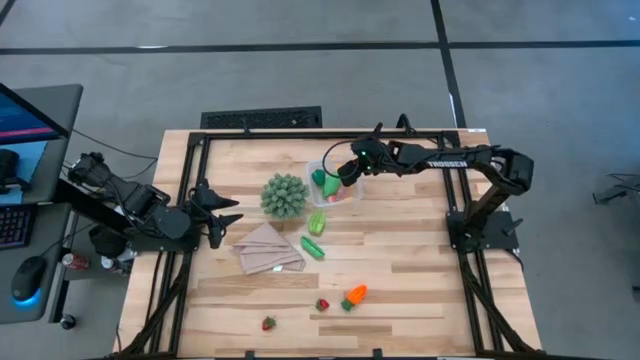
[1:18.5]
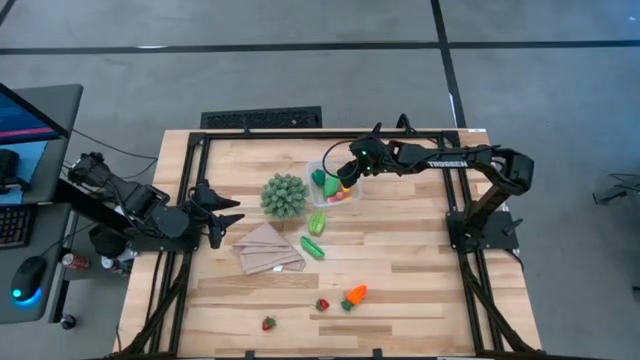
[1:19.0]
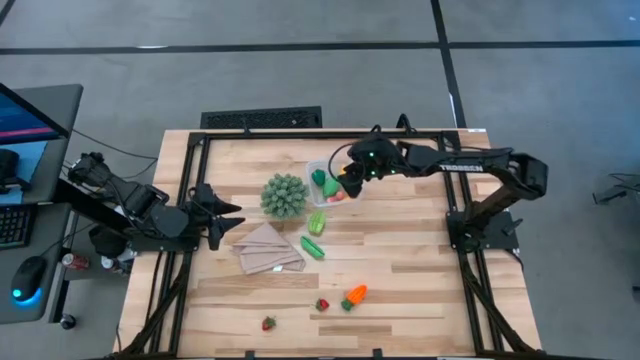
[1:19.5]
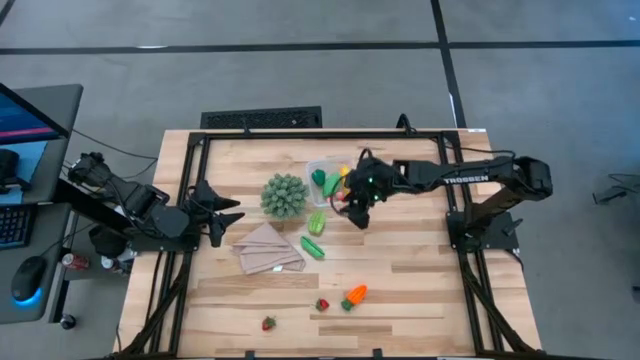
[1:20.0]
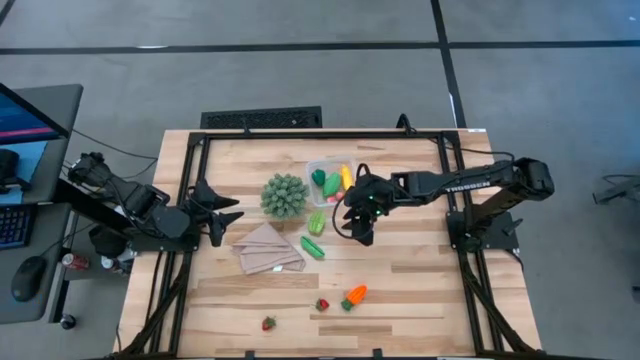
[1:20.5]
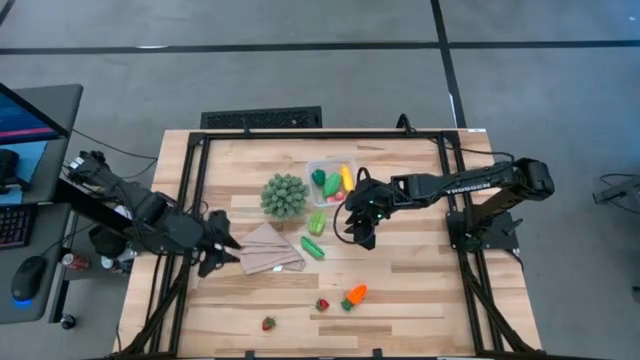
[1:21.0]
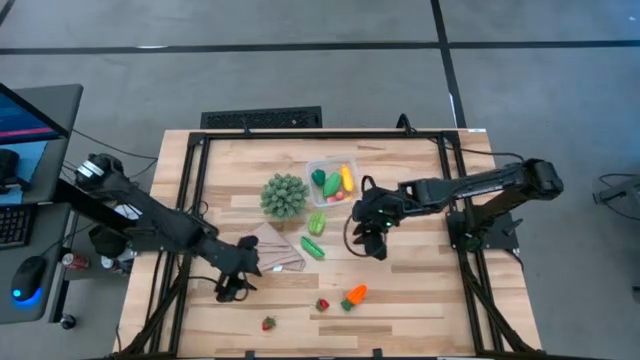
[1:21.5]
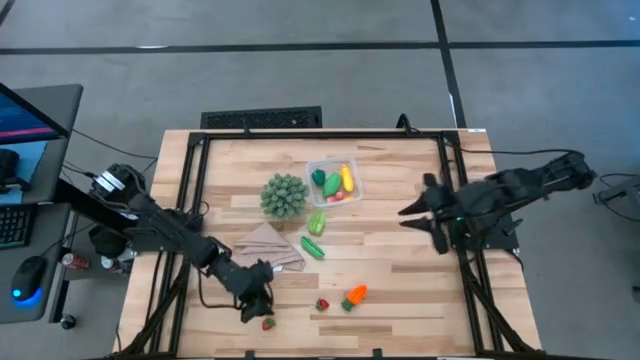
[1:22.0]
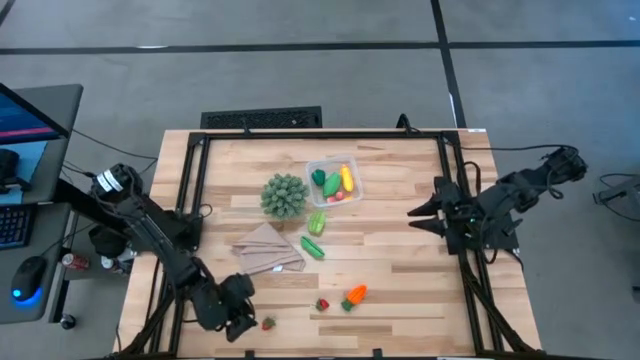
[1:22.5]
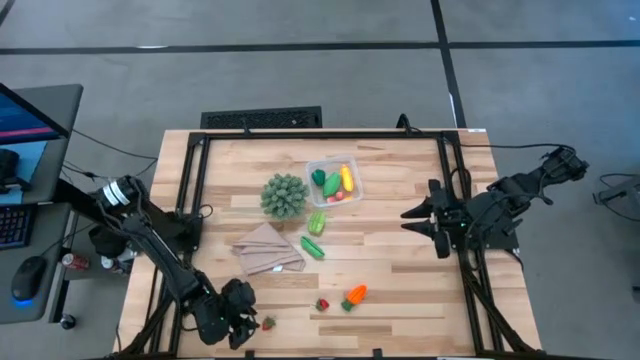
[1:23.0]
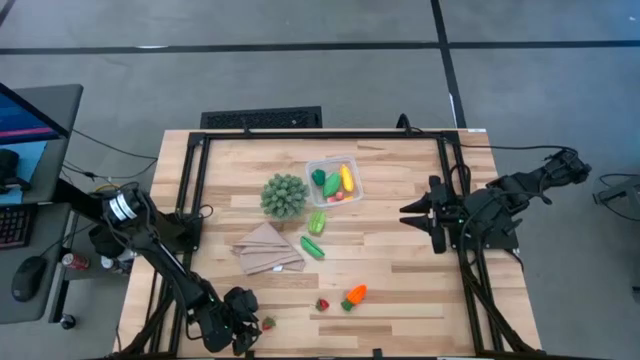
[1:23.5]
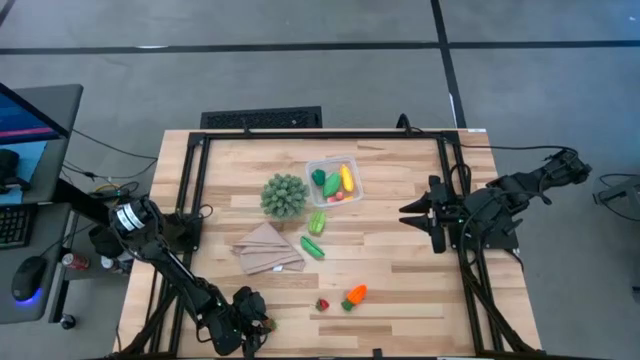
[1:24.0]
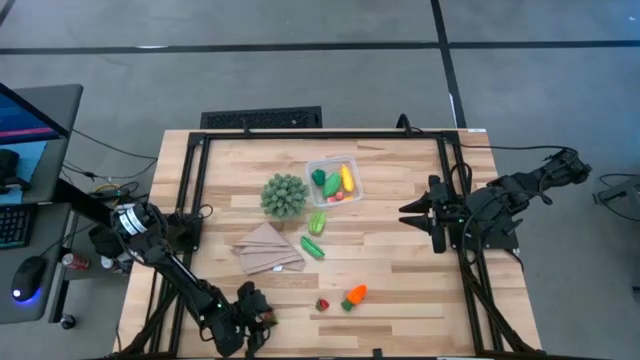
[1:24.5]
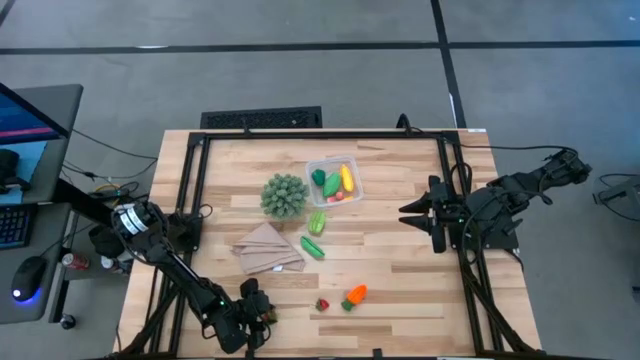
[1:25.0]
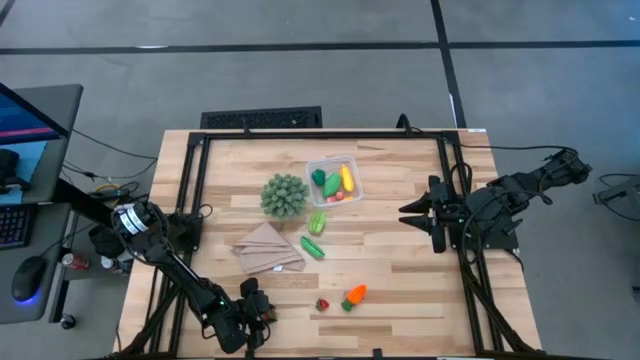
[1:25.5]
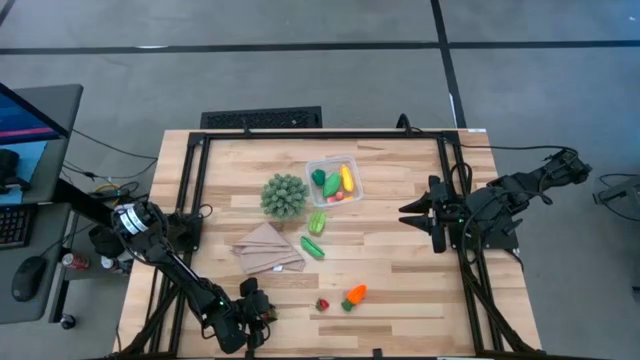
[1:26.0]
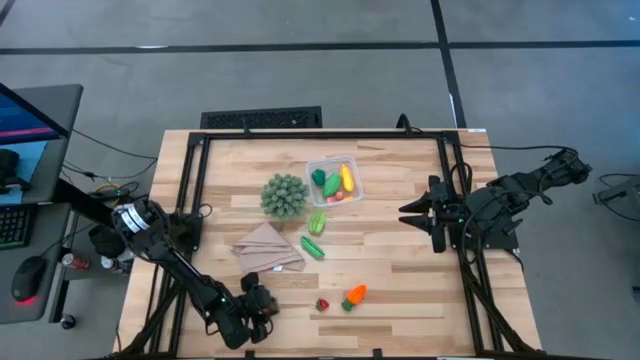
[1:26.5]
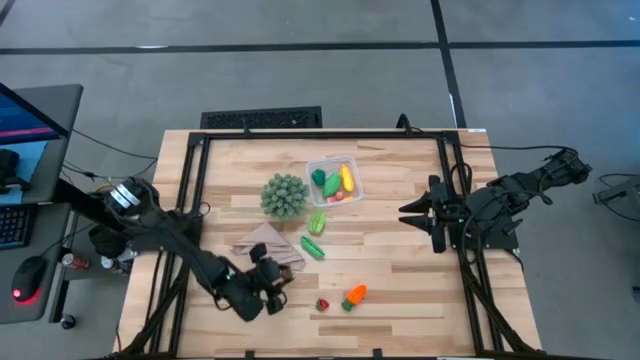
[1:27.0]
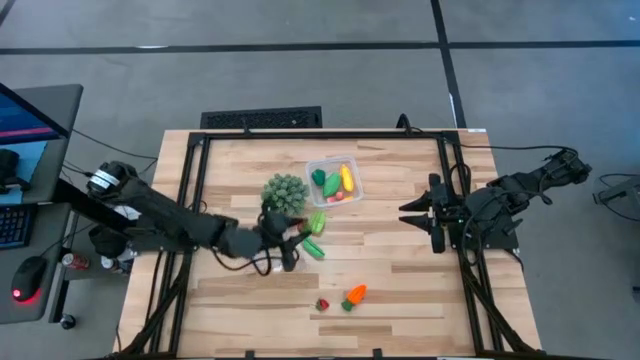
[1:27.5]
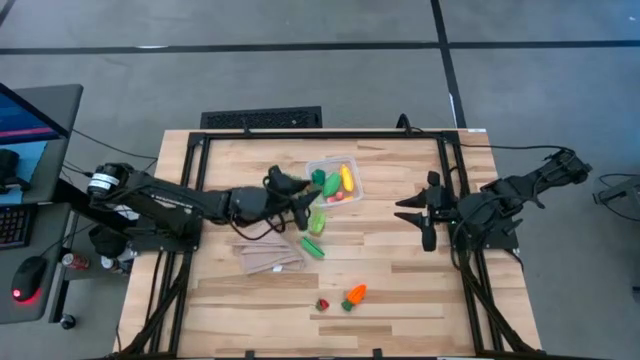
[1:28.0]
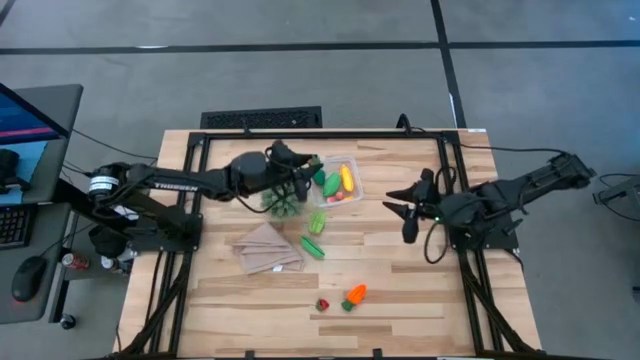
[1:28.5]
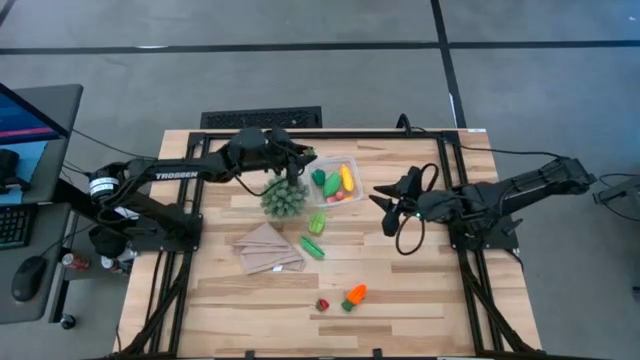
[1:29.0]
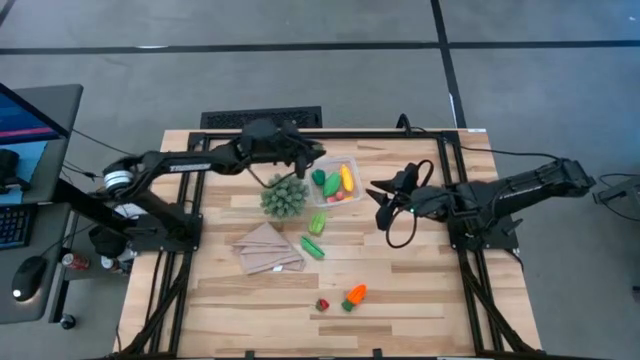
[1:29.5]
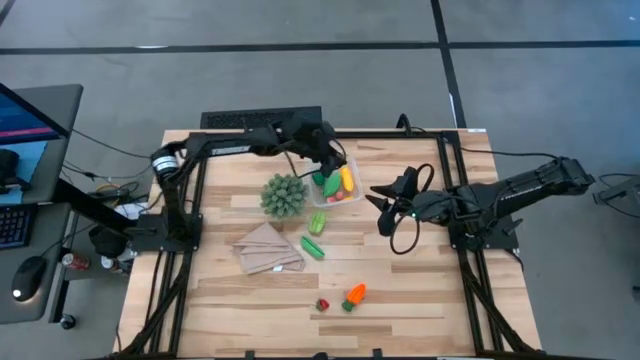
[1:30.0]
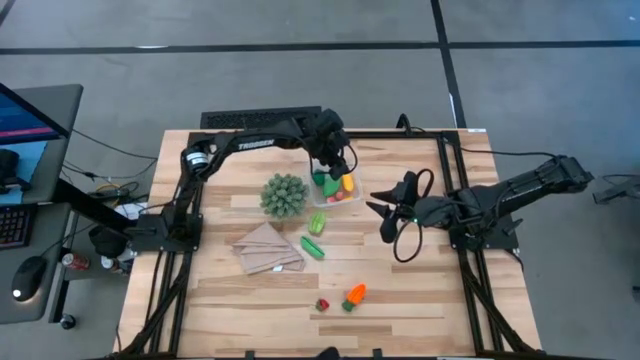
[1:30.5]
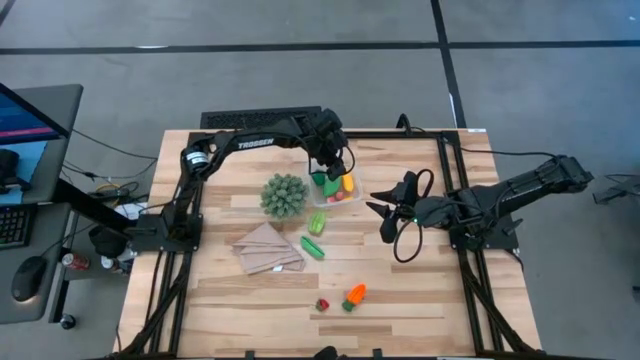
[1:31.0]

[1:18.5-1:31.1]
Task: Pick and placing Produce into tupperware
Put the left strawberry into the transparent bin

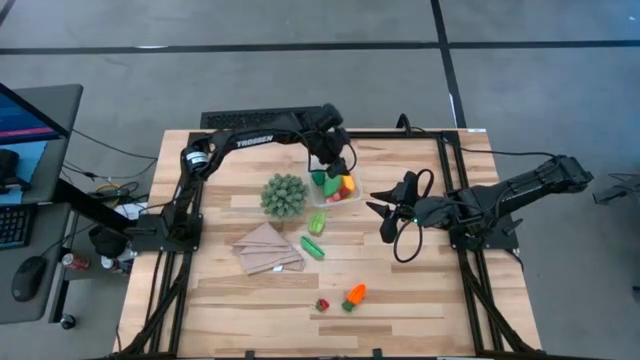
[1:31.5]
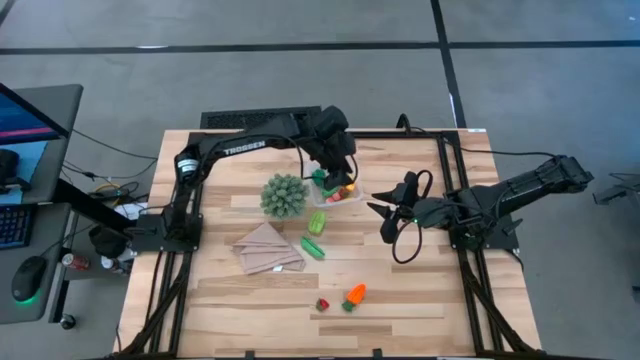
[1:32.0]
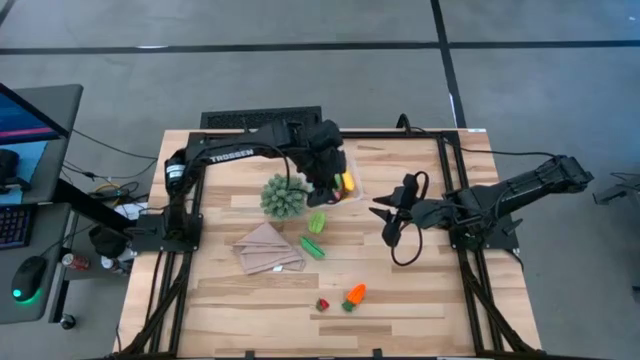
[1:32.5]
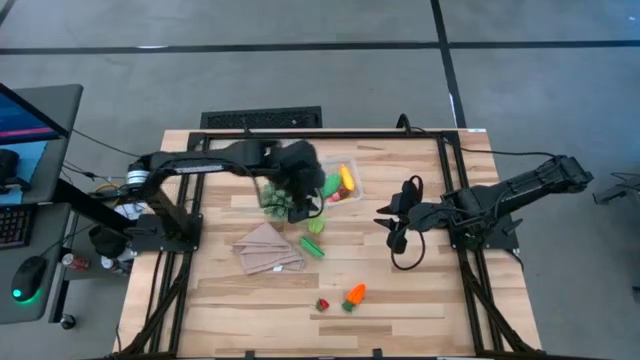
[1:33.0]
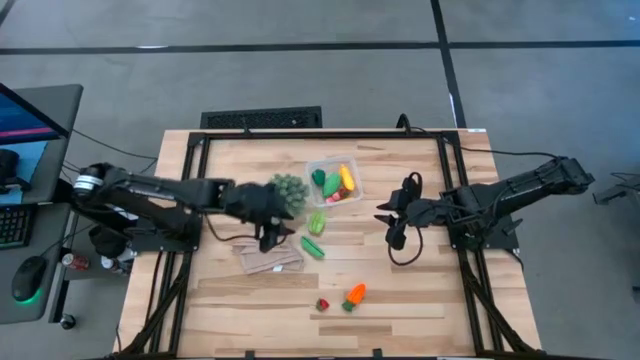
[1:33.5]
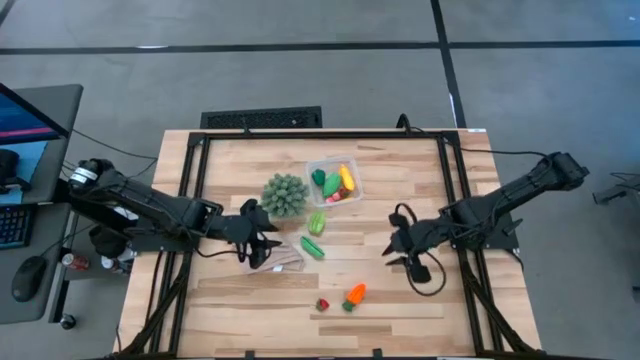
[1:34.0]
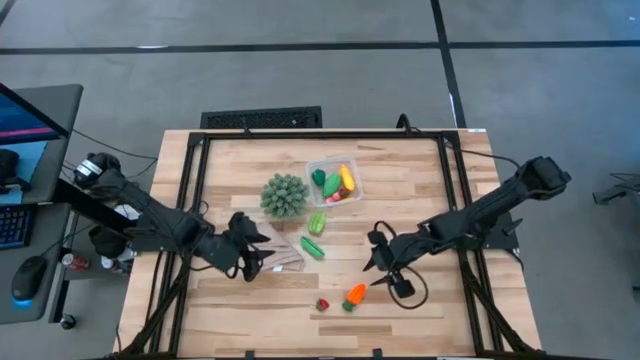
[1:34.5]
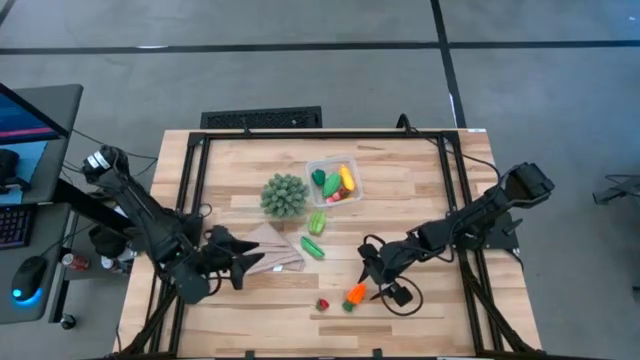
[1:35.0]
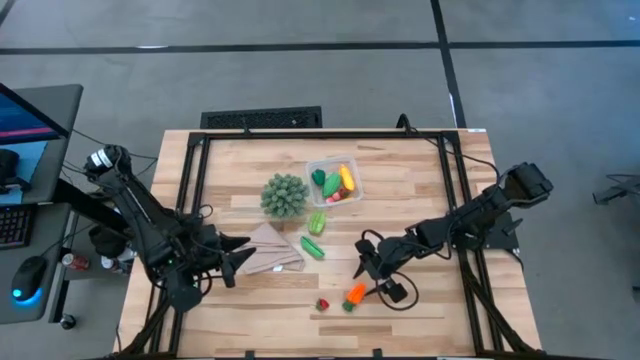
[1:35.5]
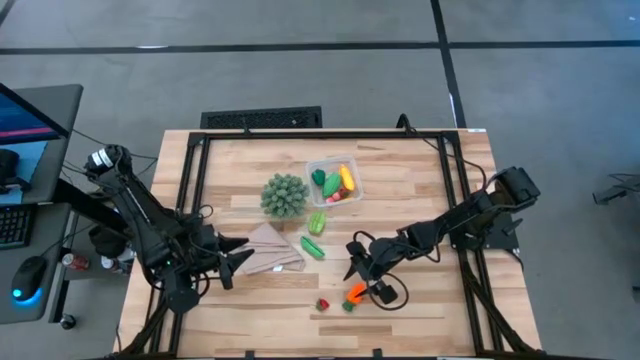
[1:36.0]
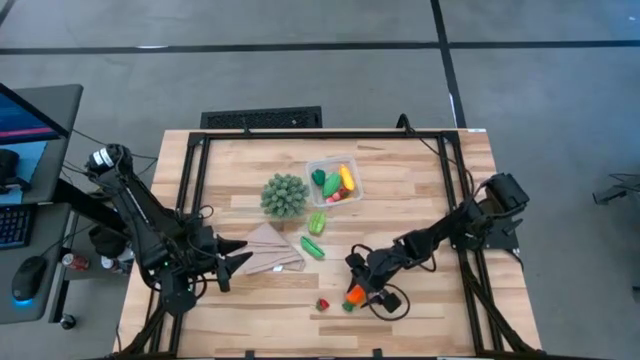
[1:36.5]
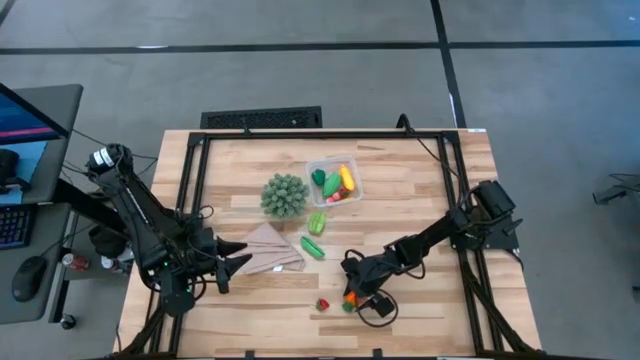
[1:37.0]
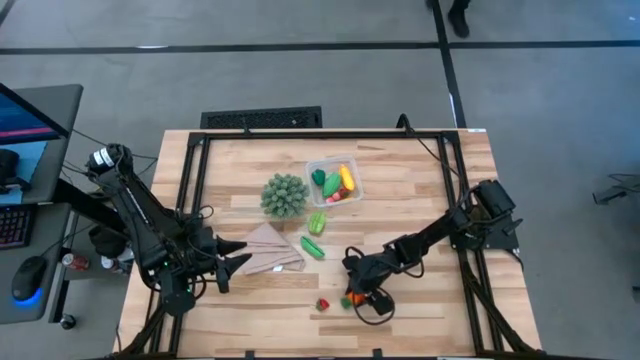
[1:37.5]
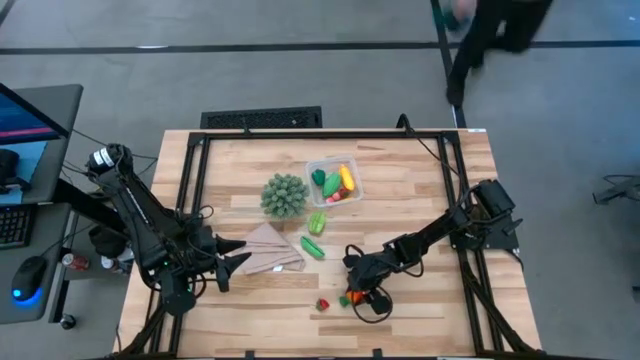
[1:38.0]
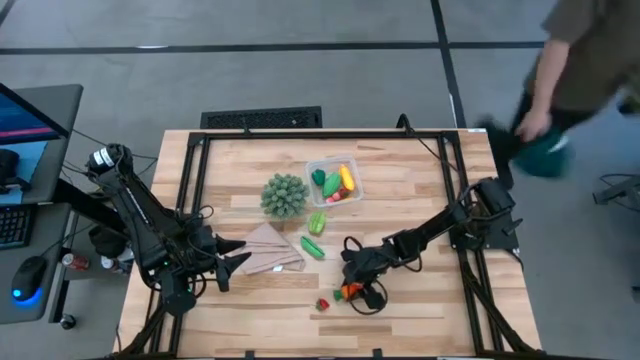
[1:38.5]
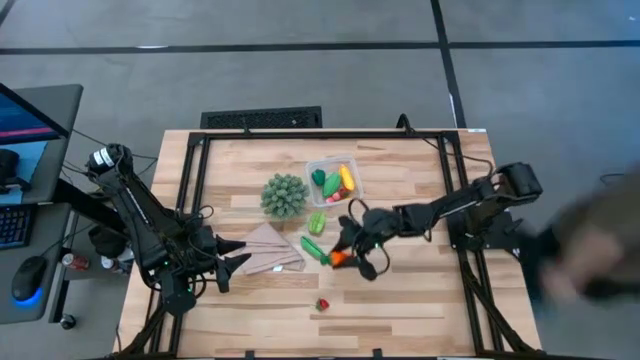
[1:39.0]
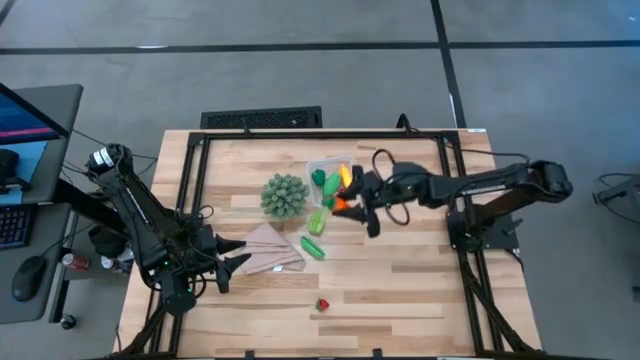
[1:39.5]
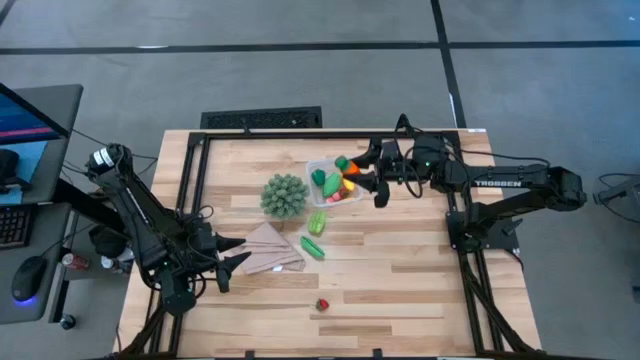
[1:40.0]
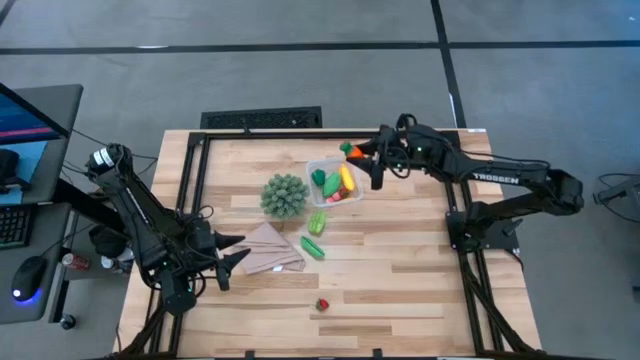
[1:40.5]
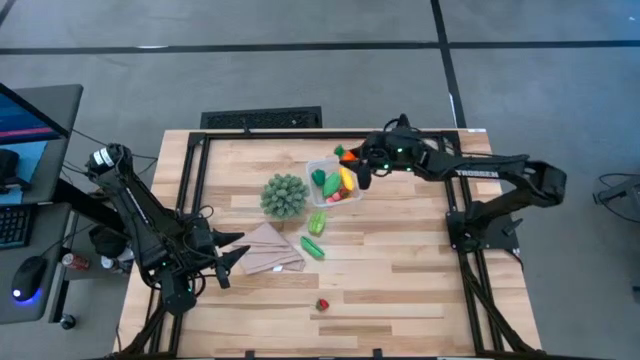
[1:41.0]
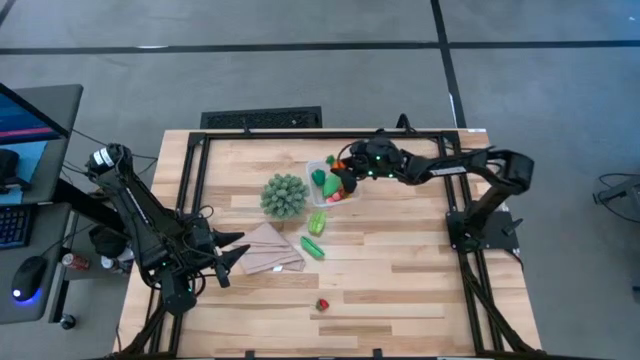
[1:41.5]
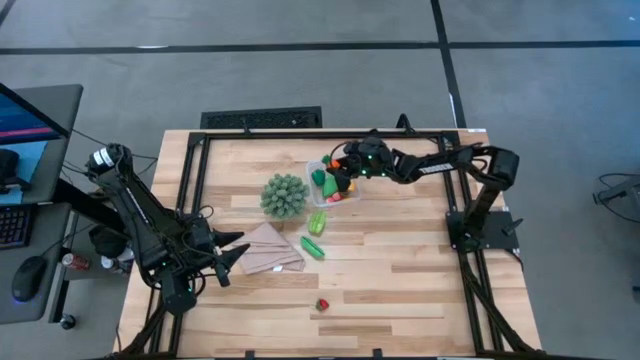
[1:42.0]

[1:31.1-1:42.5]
Put the carrot into the transparent bin
